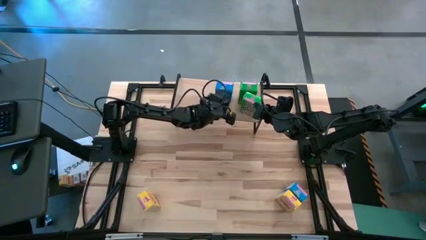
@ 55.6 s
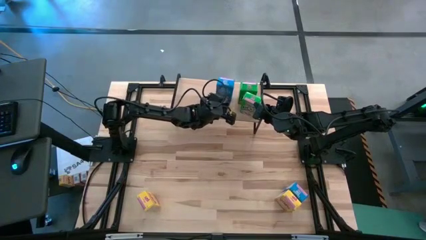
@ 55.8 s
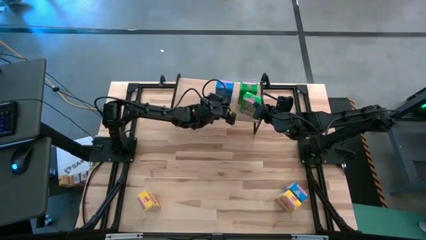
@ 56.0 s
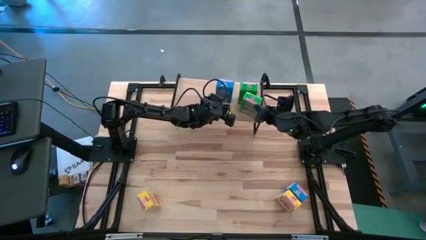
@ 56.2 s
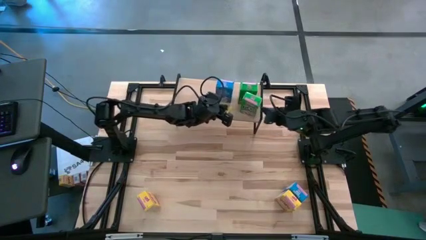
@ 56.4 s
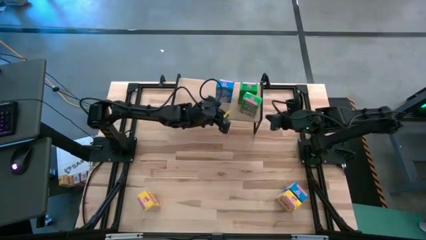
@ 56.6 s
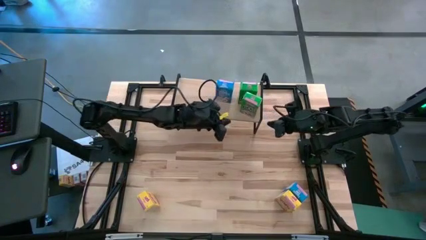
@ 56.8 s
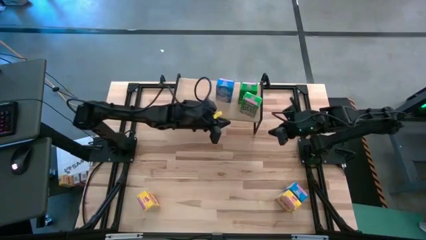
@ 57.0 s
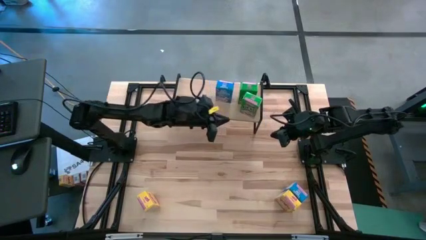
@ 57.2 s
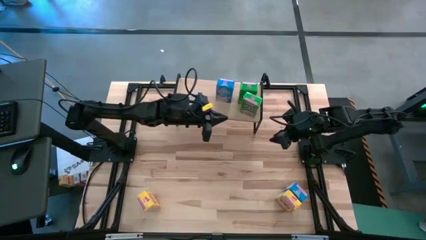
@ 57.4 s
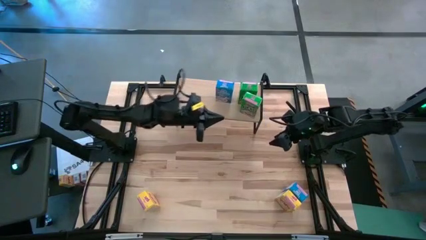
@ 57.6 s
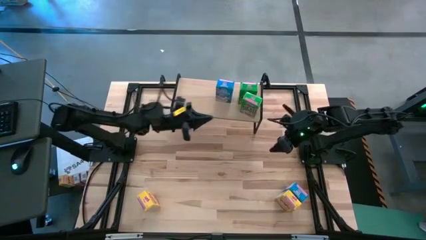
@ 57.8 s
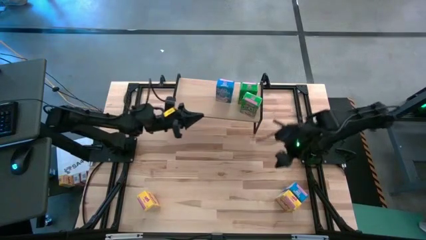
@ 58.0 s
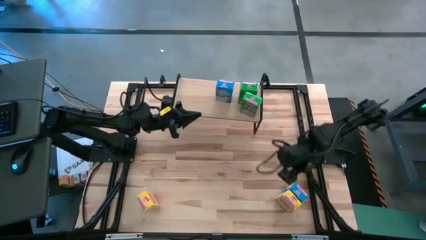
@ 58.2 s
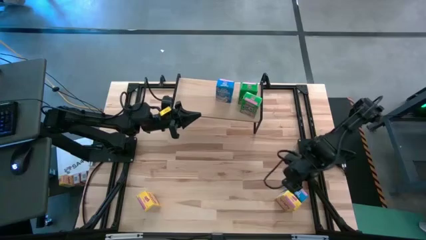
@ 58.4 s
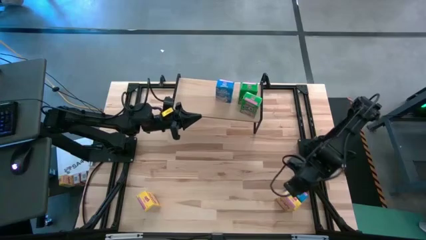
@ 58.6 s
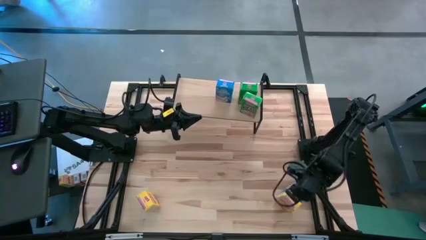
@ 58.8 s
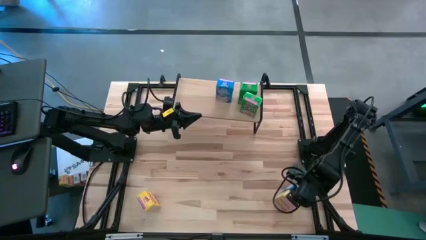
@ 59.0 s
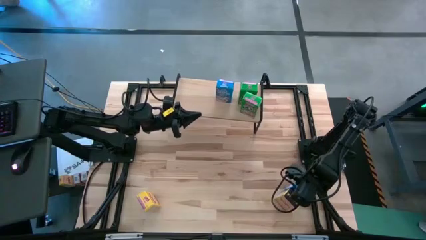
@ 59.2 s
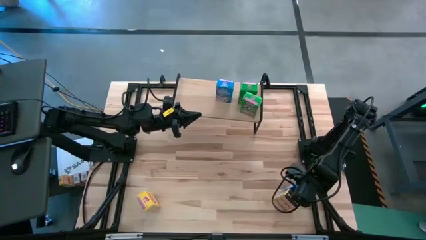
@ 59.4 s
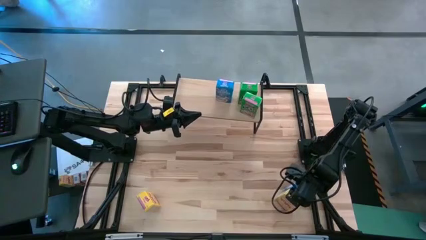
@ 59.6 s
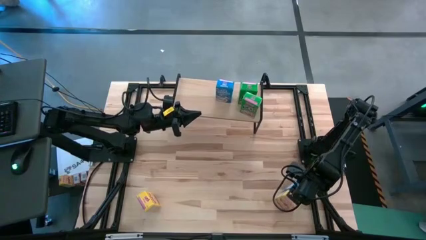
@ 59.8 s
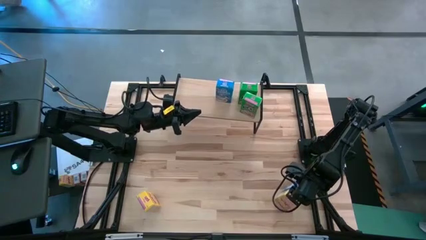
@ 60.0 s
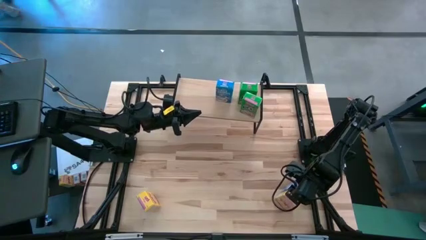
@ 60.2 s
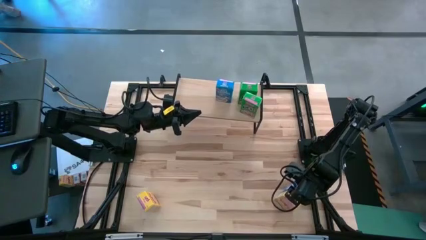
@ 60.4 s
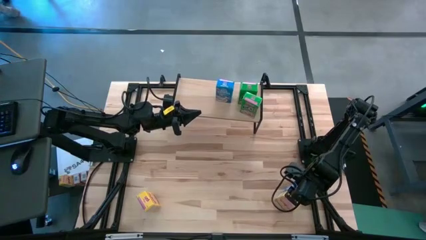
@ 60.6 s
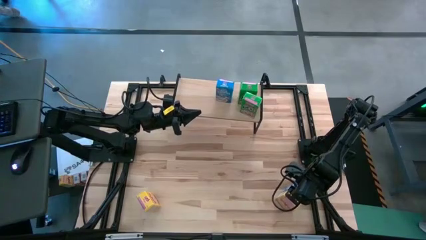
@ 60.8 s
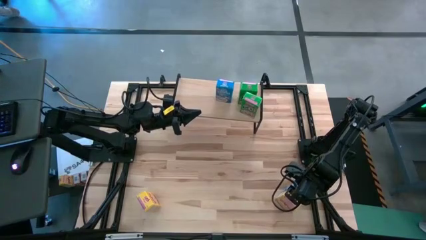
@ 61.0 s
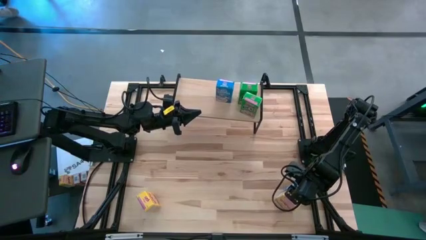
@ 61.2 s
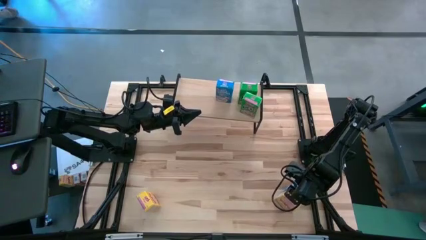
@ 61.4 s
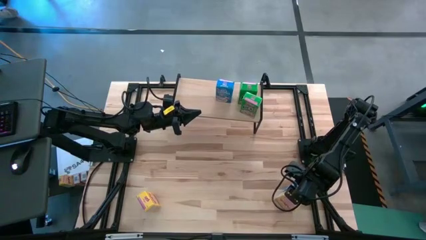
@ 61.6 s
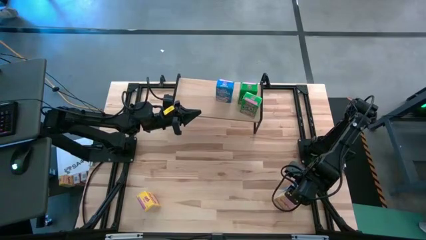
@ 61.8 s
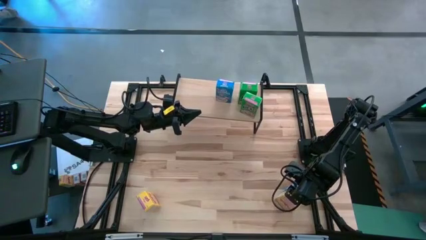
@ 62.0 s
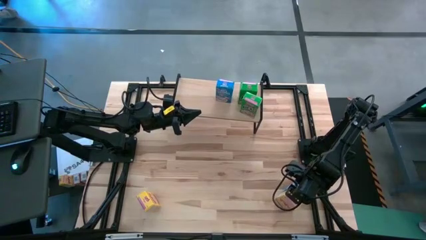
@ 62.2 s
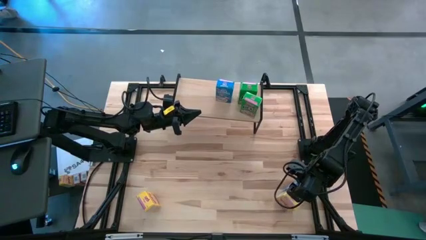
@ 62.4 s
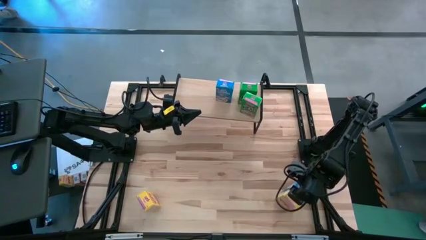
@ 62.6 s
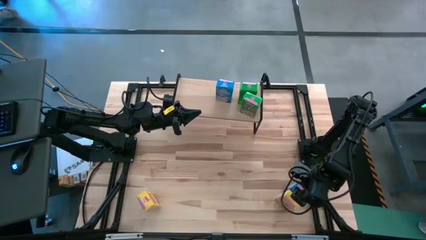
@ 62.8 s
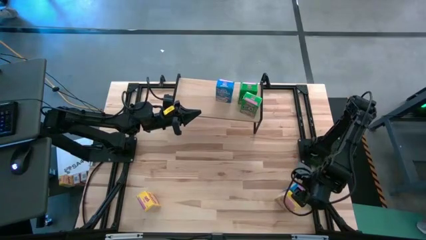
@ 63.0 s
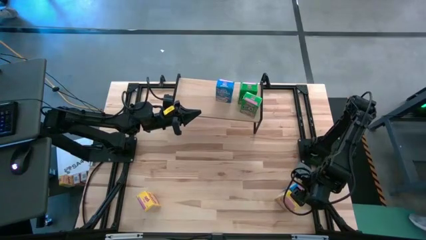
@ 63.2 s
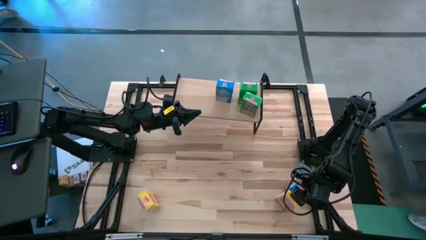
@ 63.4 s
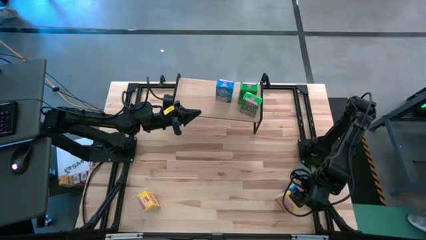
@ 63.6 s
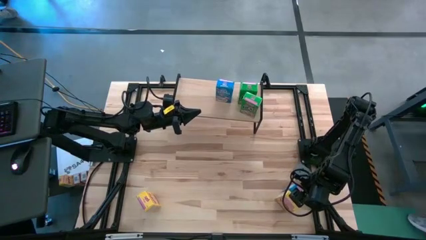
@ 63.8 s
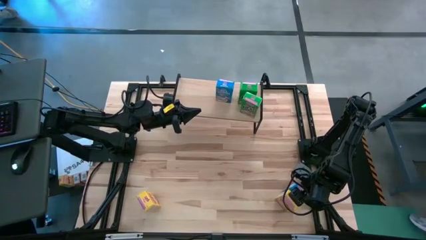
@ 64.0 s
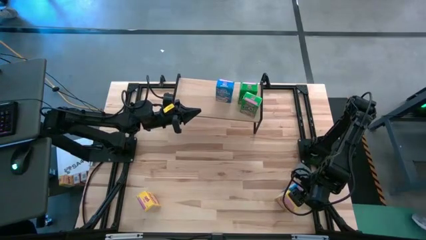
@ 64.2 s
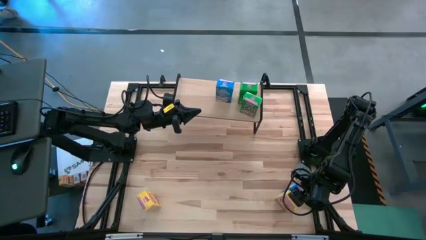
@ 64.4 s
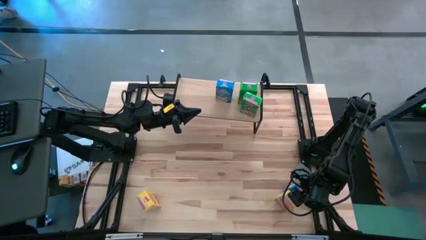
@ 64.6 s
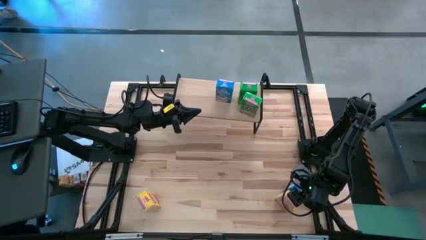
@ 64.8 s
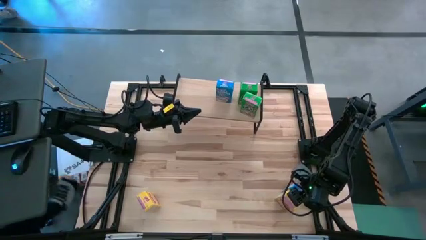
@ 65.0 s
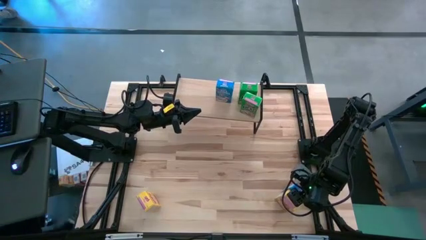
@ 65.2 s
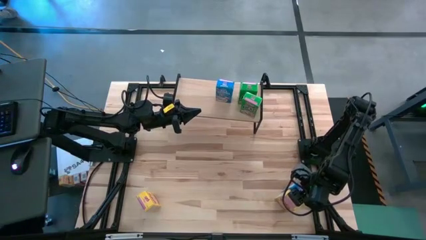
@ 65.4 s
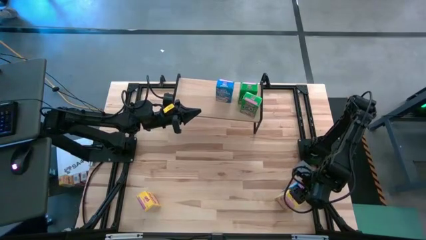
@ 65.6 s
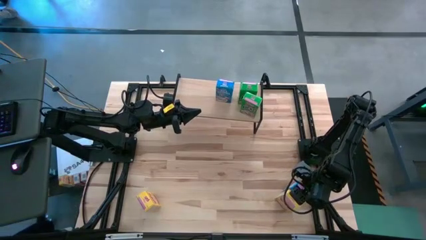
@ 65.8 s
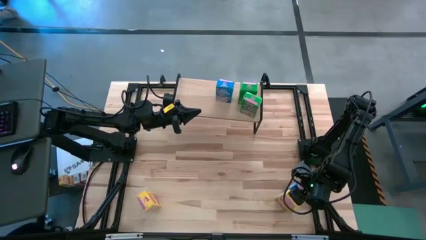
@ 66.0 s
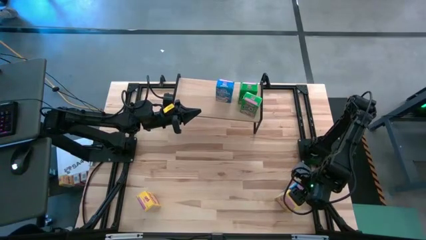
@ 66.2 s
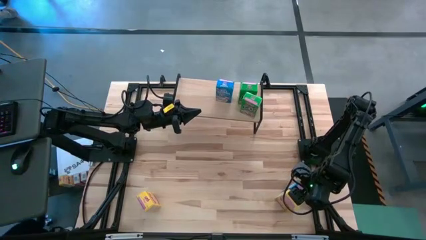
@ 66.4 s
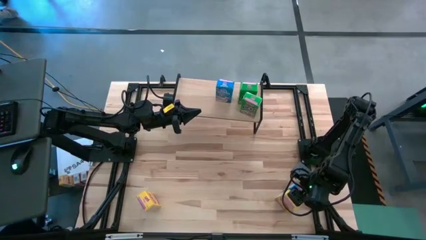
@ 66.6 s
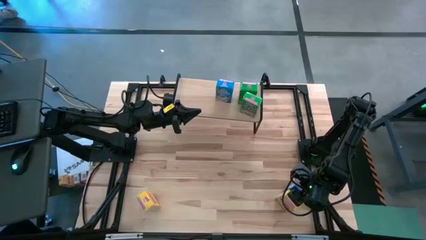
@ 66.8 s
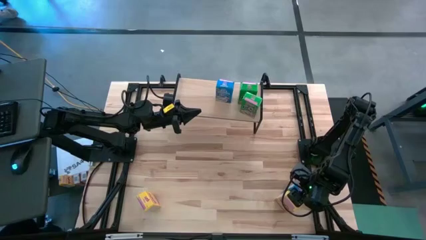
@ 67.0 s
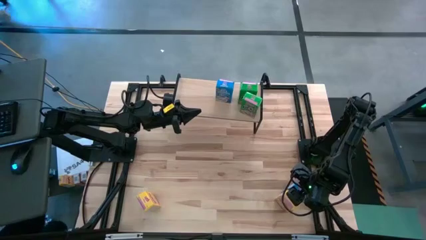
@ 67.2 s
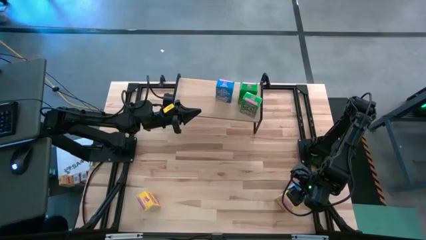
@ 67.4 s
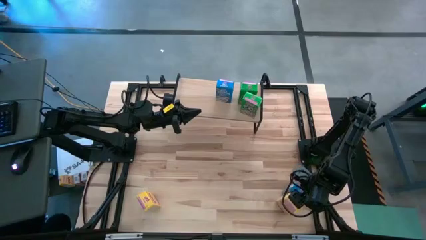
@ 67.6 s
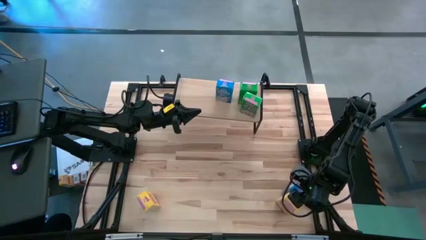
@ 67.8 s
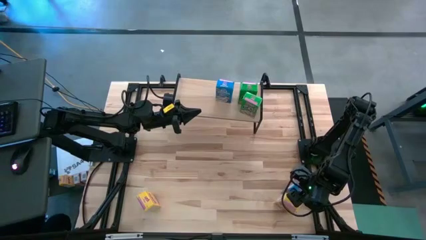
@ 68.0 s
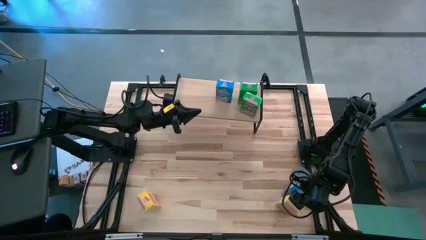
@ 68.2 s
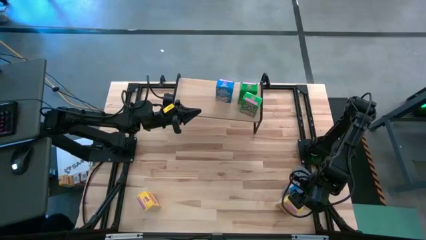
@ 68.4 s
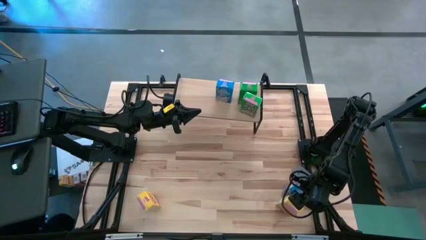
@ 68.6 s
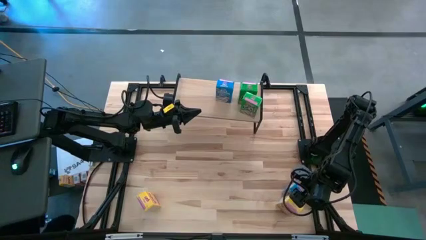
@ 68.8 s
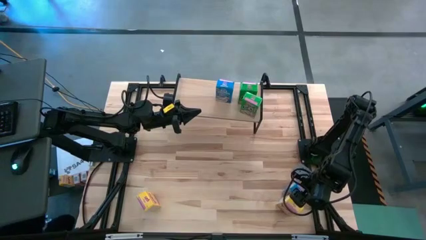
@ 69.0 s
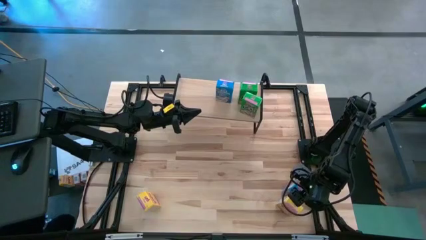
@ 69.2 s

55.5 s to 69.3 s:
Task: Stack cereal on shelf
Put the blue cereal box on the shelf aligned with the other blue cereal box
